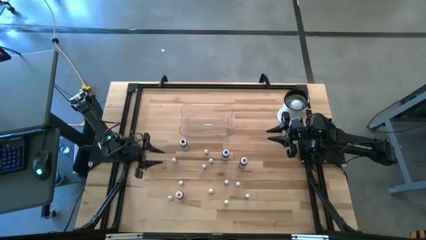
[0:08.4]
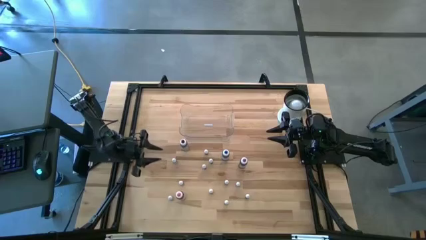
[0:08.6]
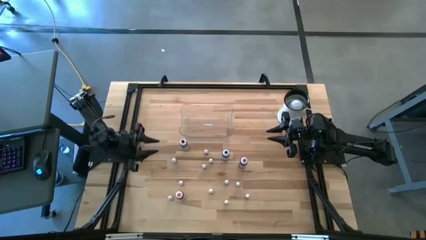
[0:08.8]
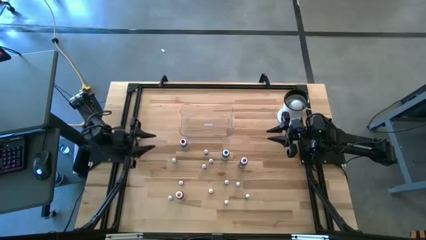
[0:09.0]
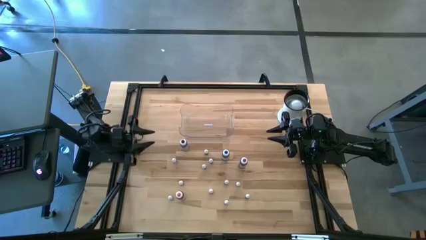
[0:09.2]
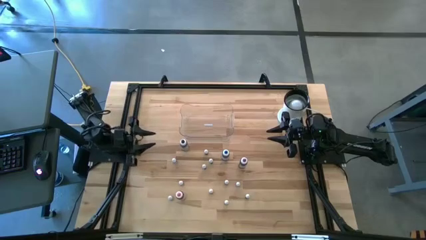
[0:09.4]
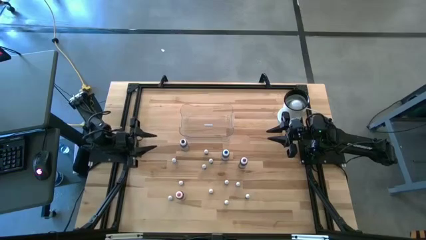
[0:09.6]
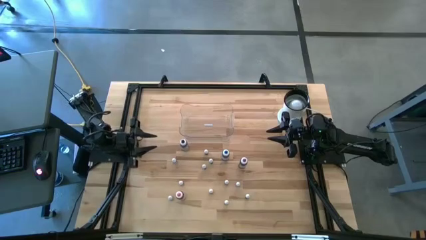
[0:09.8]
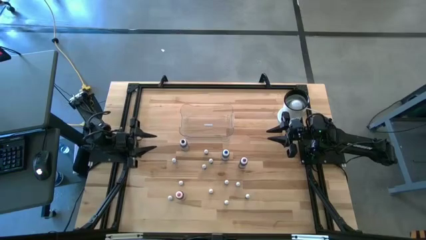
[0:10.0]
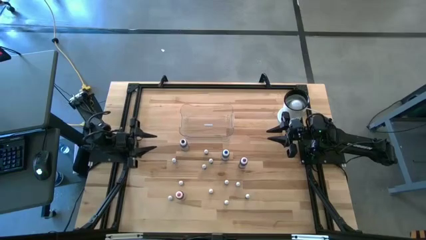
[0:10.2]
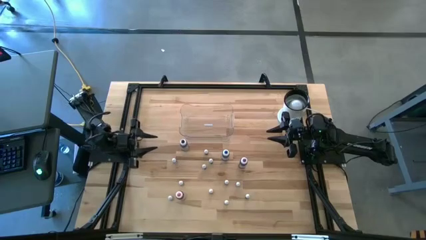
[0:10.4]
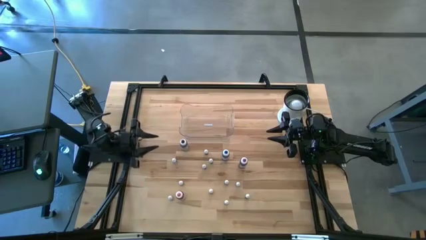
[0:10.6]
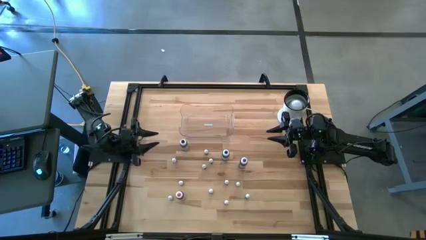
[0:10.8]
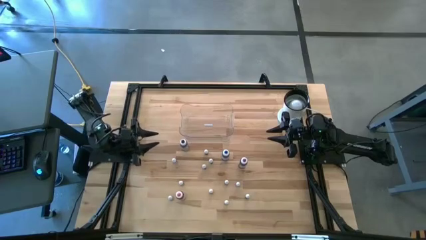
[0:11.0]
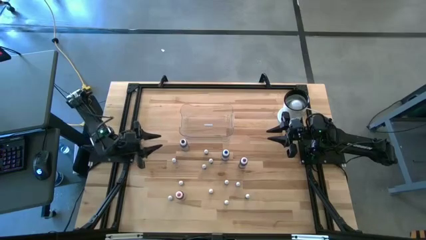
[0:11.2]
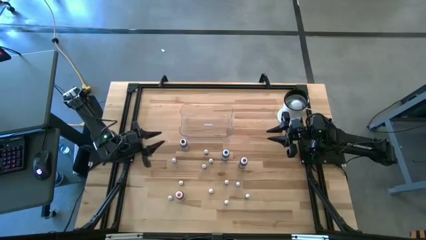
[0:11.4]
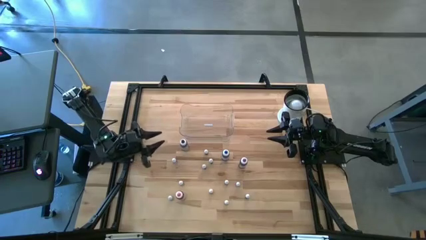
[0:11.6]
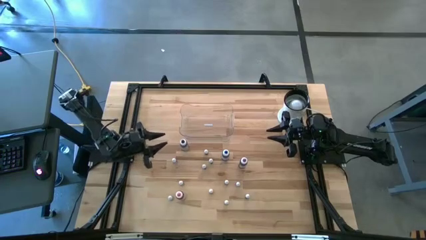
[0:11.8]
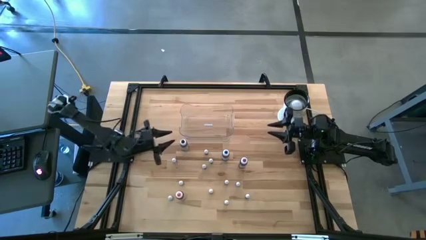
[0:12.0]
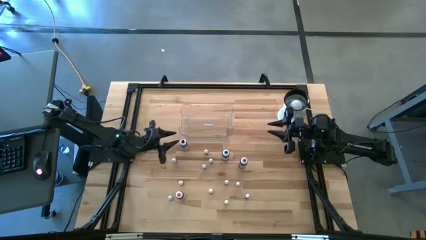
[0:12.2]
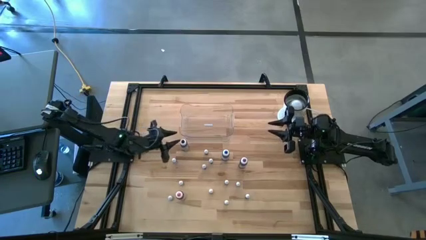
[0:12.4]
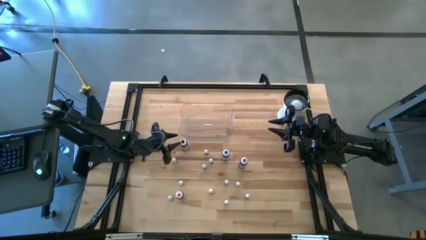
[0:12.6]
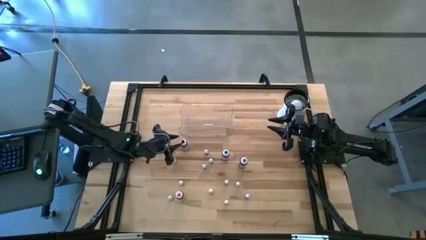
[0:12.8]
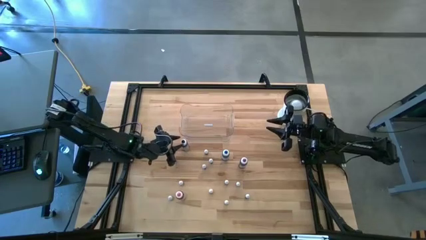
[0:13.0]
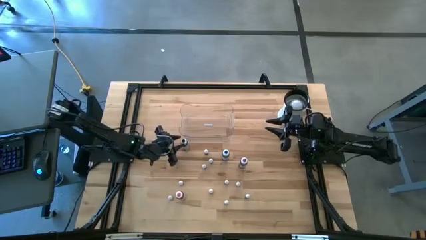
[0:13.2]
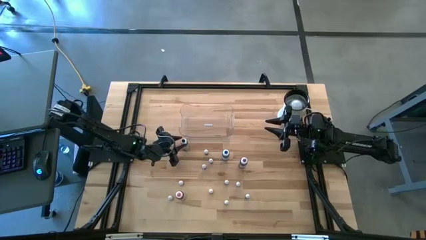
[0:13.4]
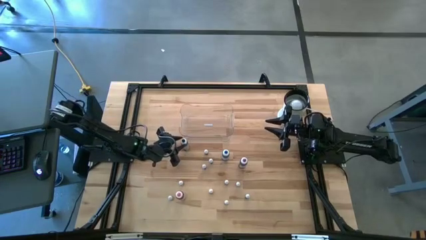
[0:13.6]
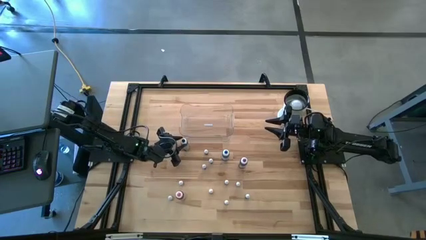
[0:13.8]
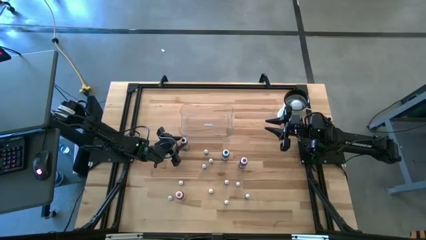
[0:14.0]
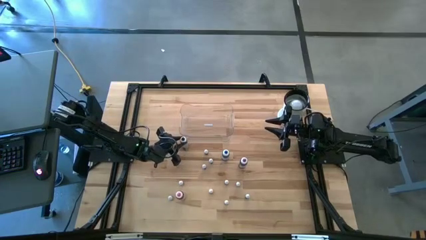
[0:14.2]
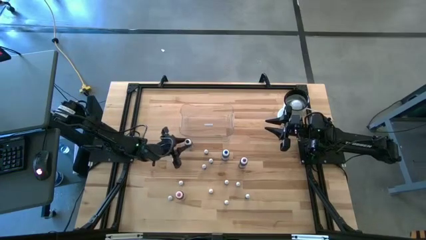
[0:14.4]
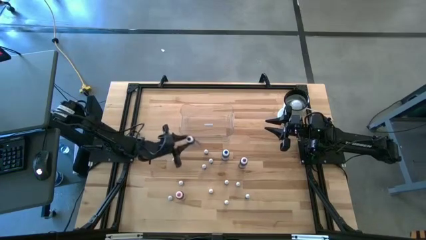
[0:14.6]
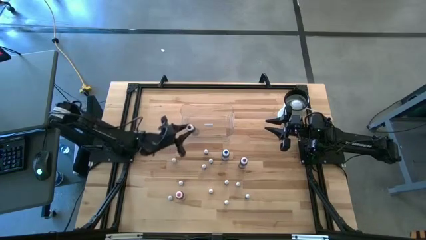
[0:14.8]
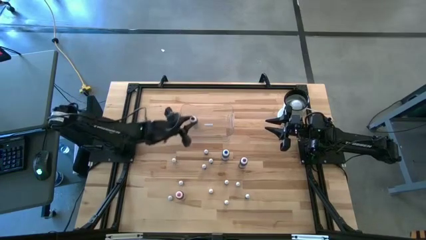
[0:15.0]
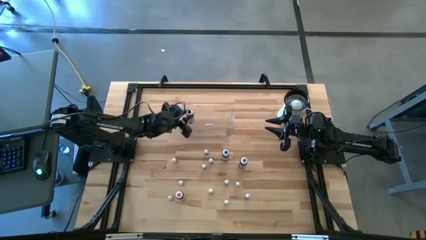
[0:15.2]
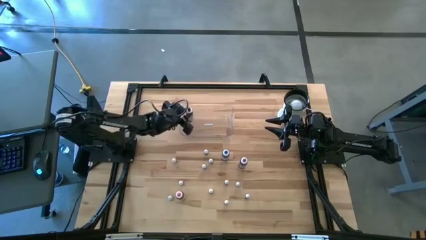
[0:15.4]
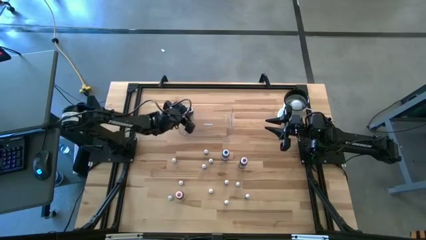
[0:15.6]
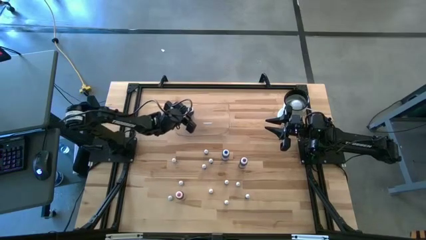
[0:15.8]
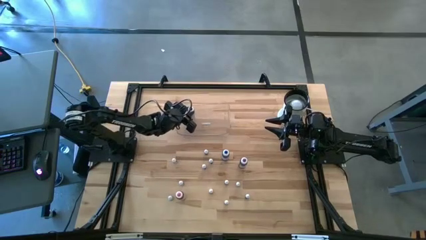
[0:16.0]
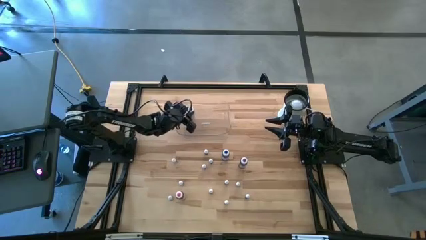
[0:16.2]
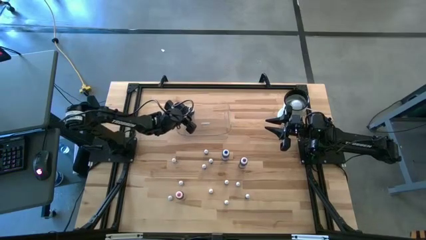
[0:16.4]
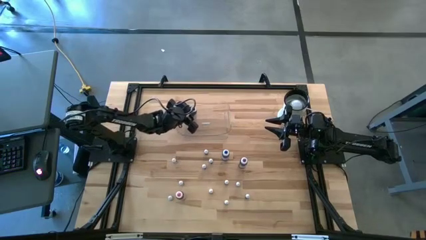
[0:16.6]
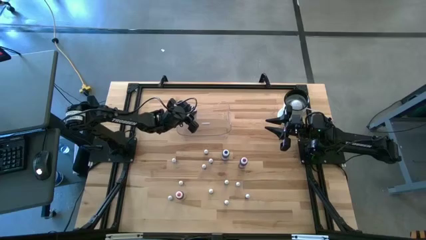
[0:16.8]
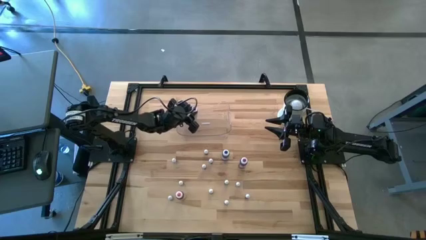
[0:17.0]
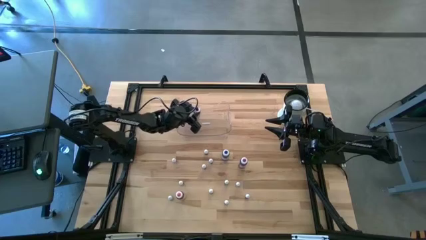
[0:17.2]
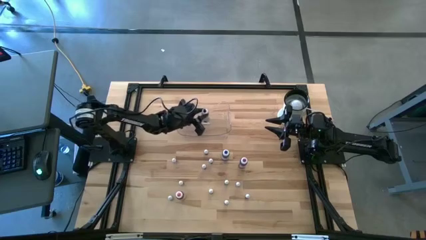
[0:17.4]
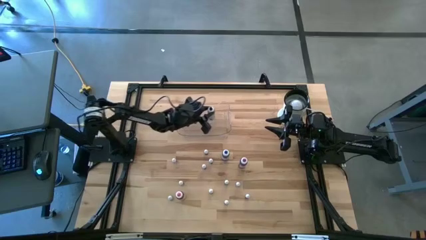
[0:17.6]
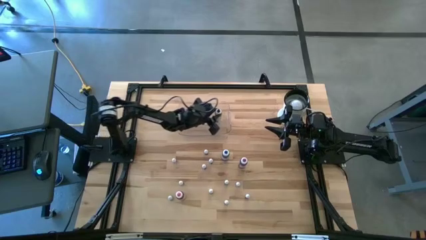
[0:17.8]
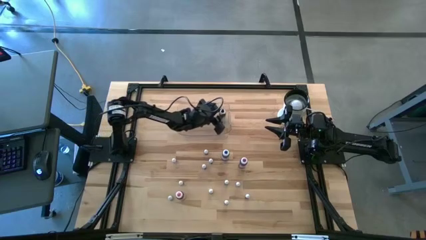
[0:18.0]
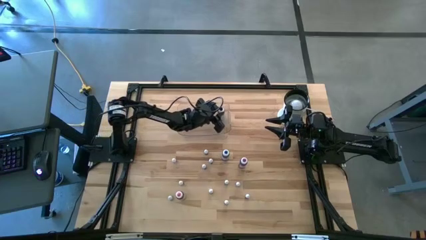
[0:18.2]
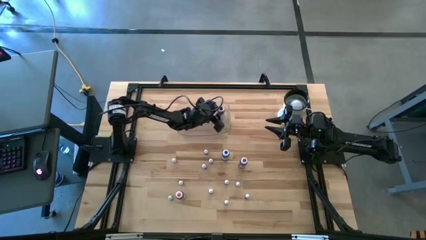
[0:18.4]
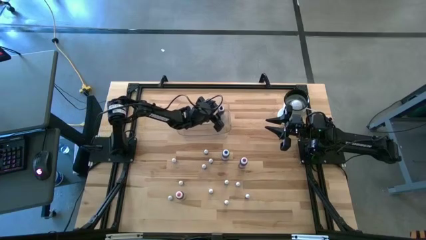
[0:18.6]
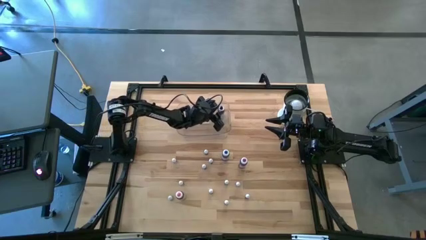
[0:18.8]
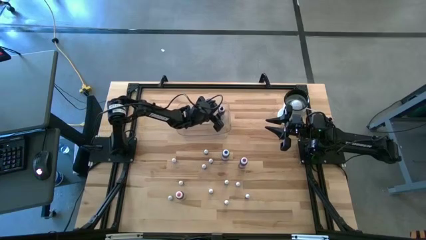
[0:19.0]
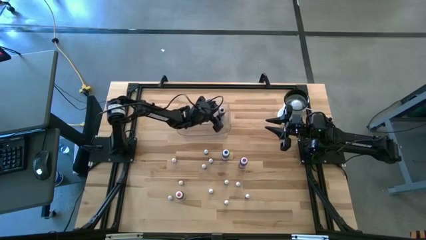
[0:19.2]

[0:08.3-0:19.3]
Task: Pick & Place food coloring
Put the large black food coloring bottle into the transparent bin

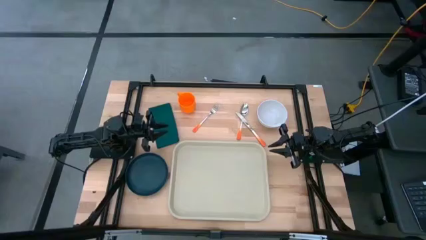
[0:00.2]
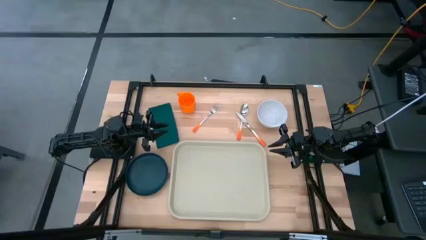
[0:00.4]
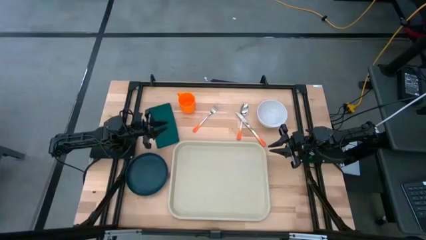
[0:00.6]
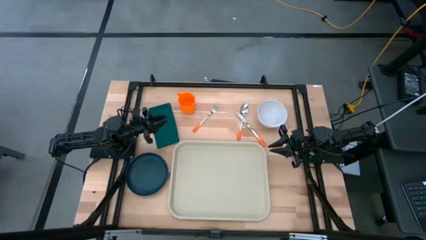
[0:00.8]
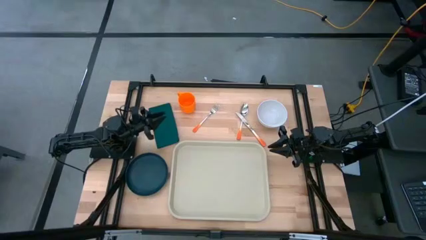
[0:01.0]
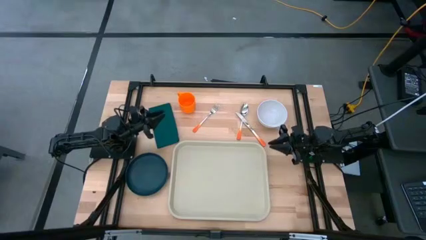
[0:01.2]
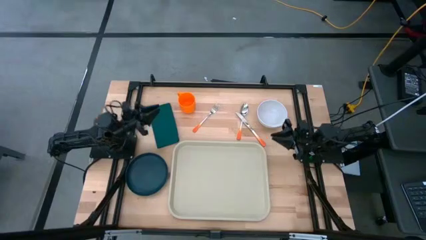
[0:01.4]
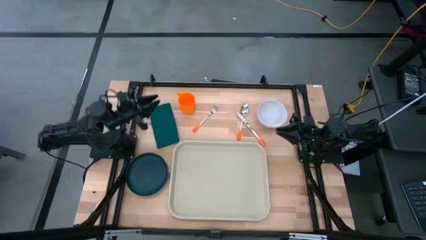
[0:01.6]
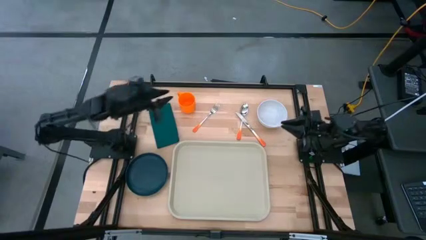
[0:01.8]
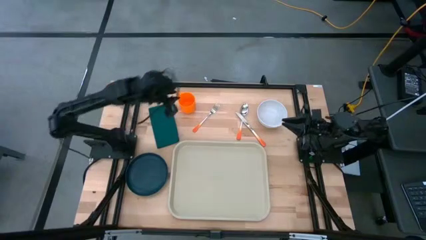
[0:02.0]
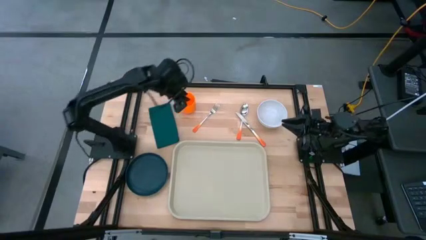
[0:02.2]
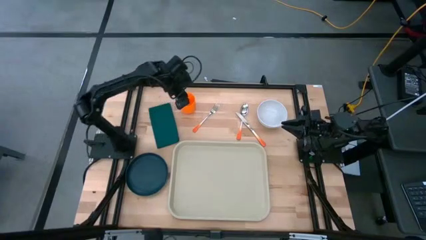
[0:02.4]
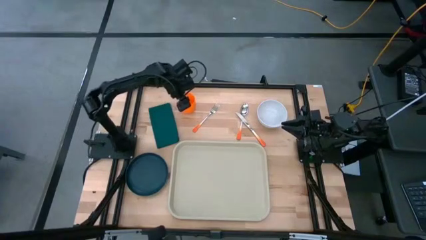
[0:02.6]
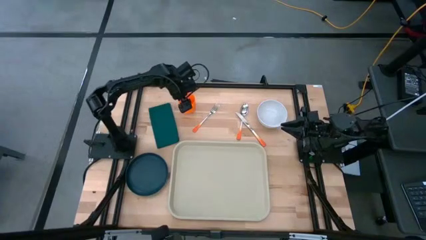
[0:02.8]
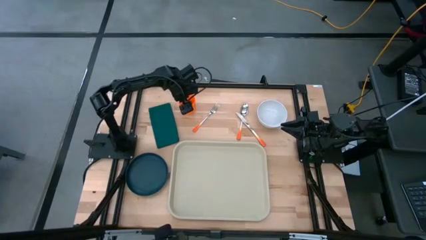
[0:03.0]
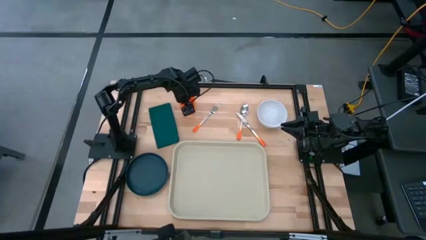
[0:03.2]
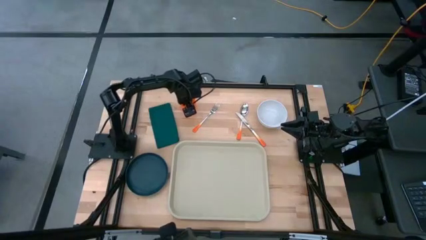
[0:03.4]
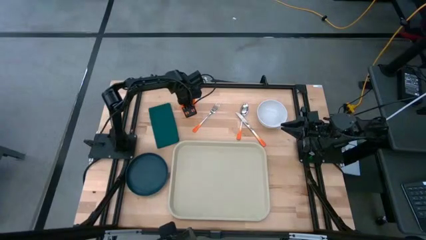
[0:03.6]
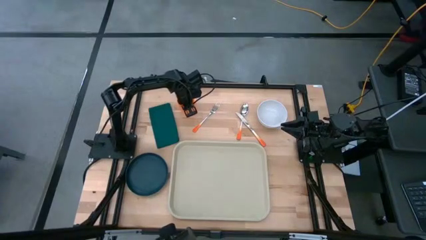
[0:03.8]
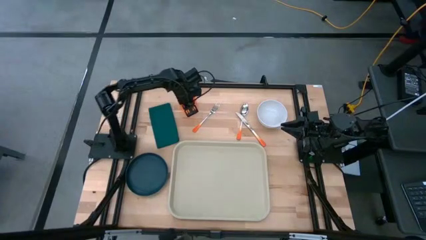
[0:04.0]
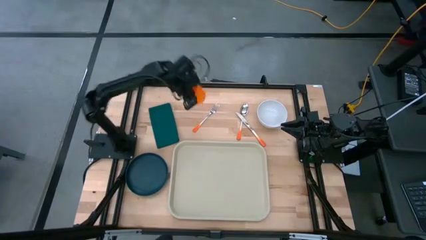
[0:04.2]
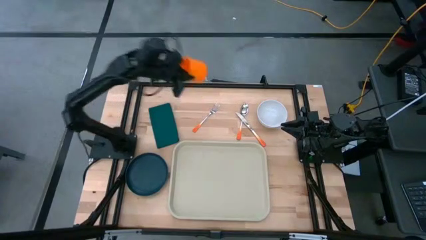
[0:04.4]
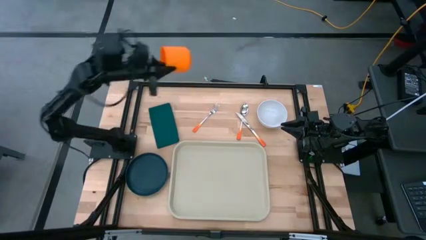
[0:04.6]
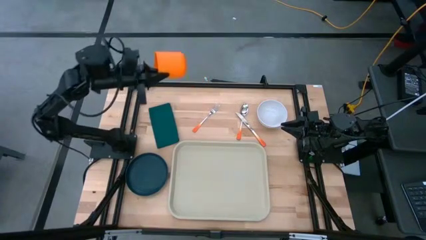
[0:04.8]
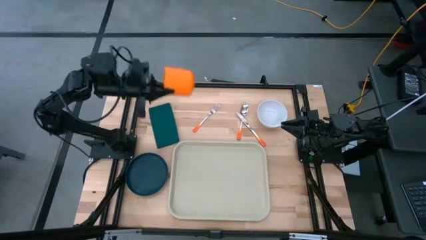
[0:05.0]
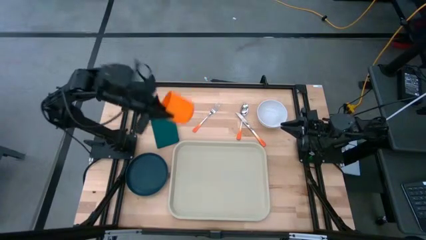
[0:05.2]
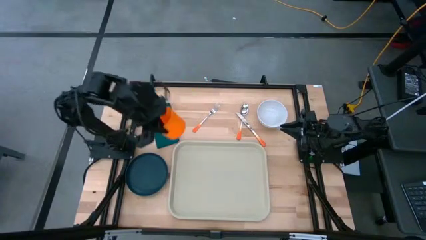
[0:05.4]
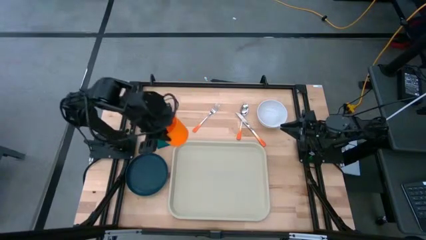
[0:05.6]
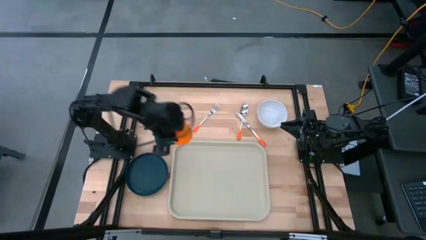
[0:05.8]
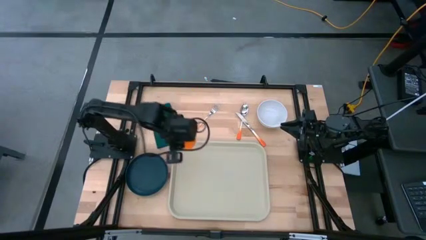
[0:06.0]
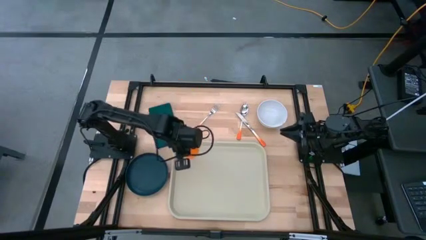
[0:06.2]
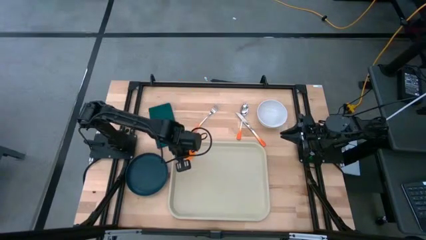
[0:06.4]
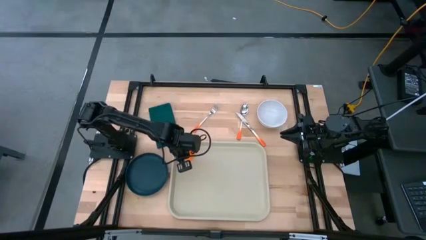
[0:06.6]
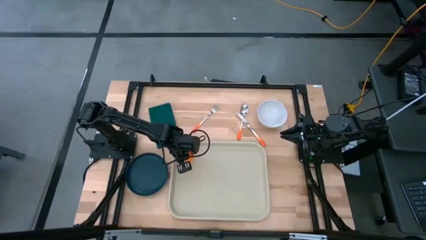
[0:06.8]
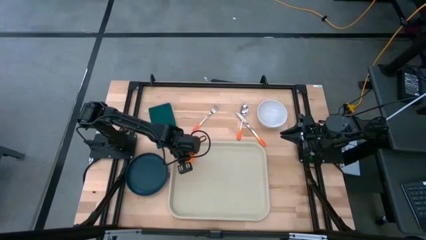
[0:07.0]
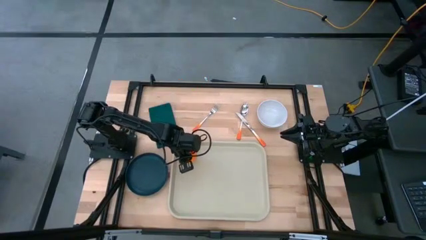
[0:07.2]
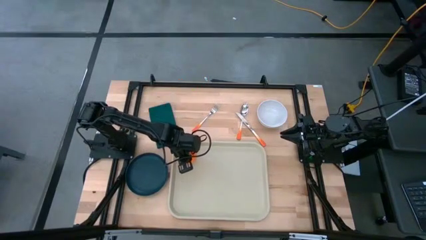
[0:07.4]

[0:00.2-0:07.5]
Task: Set up tray
Put the mug on the tray
